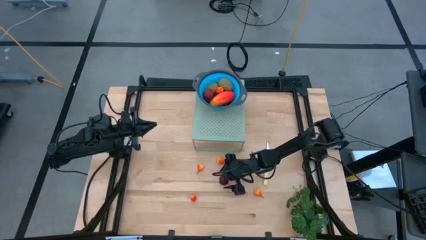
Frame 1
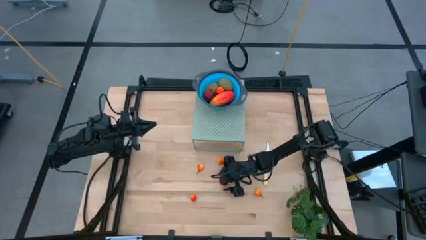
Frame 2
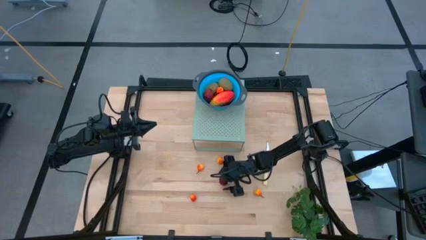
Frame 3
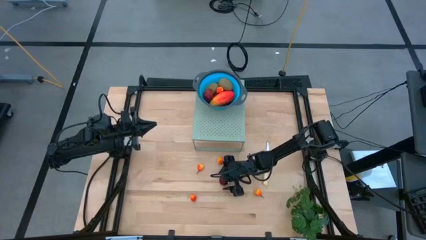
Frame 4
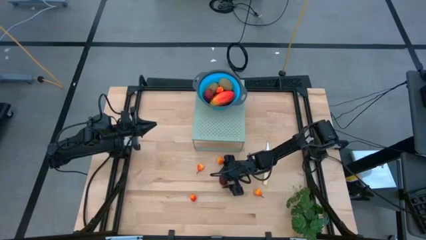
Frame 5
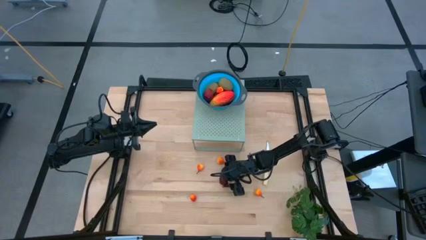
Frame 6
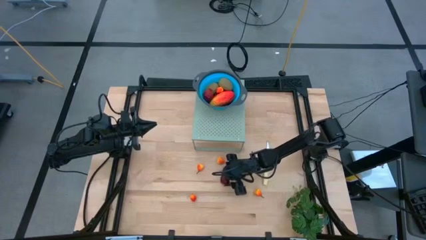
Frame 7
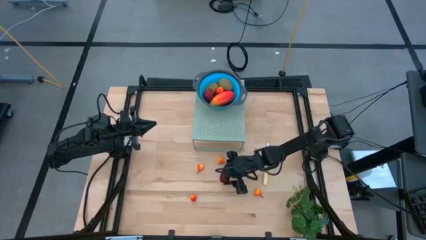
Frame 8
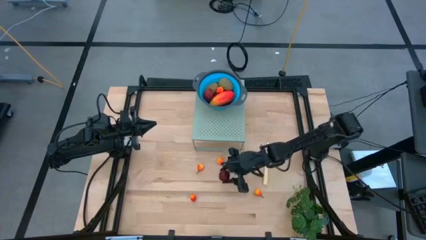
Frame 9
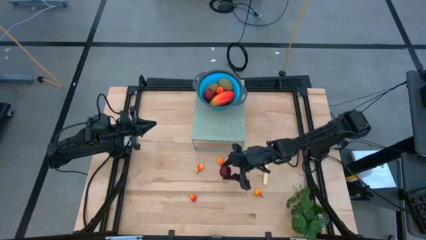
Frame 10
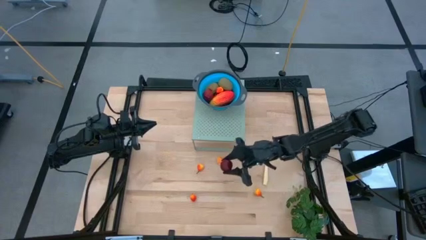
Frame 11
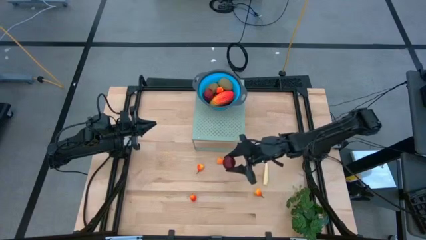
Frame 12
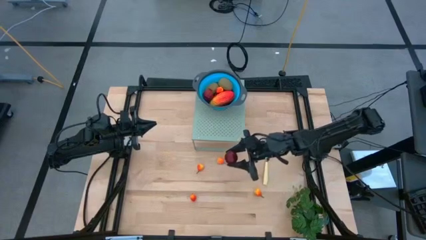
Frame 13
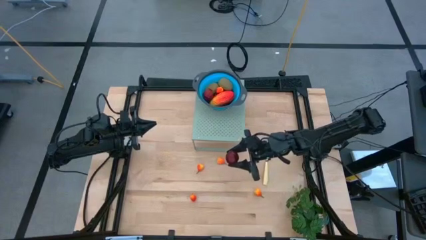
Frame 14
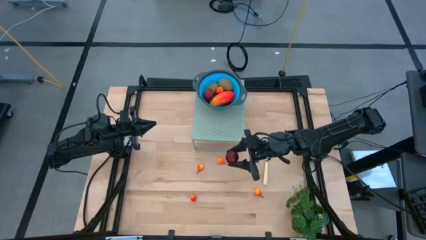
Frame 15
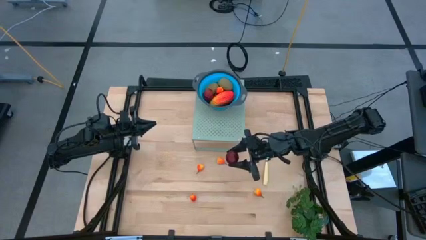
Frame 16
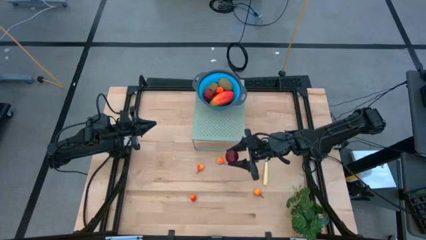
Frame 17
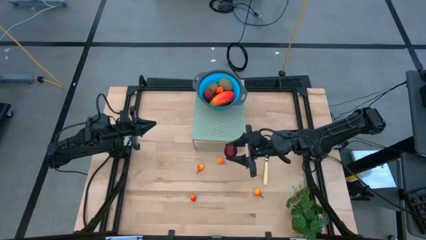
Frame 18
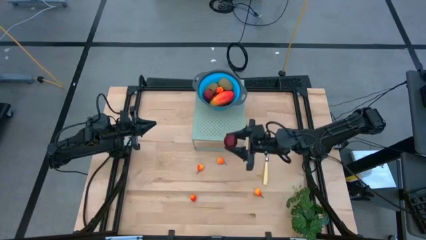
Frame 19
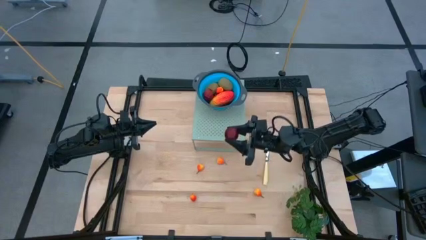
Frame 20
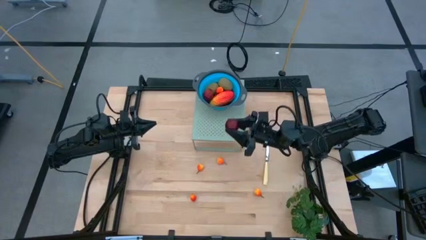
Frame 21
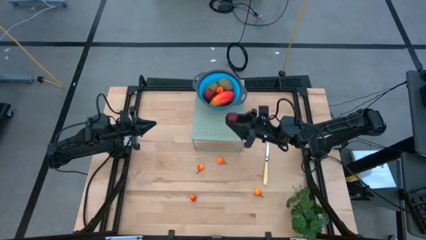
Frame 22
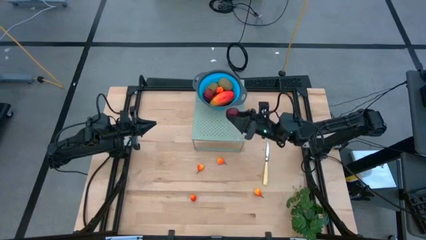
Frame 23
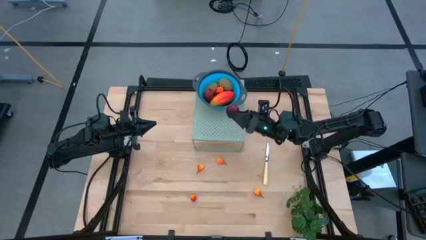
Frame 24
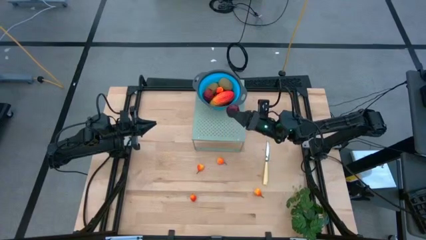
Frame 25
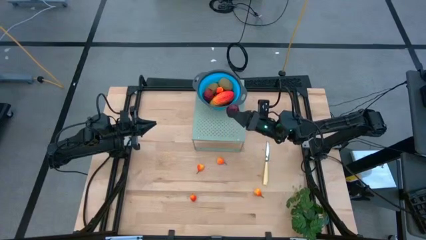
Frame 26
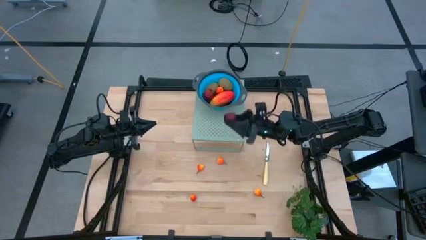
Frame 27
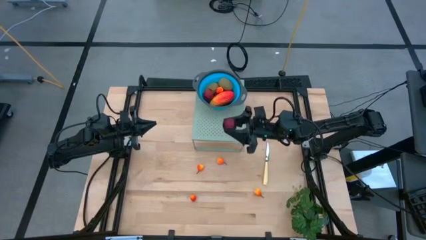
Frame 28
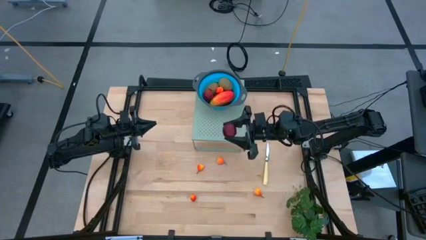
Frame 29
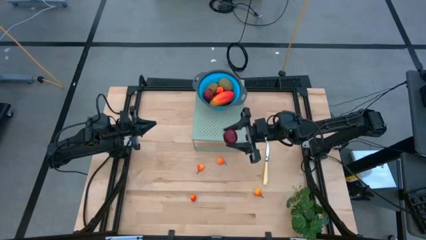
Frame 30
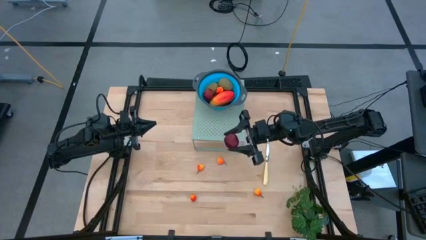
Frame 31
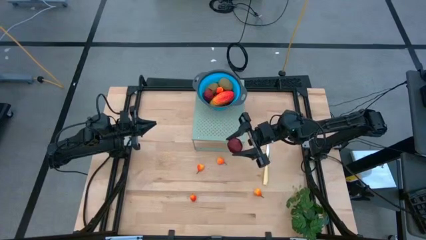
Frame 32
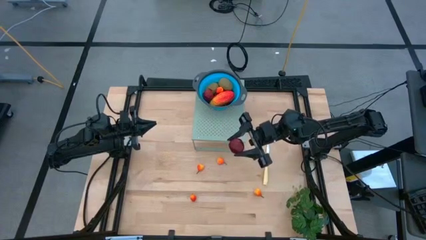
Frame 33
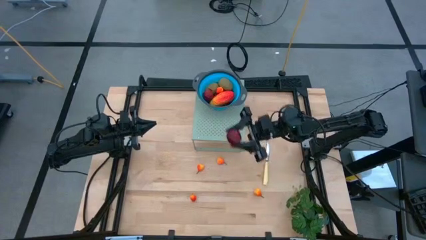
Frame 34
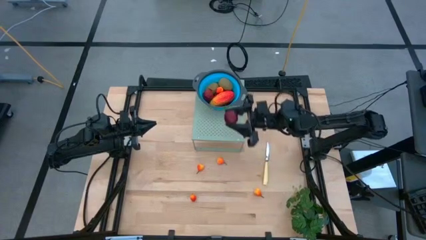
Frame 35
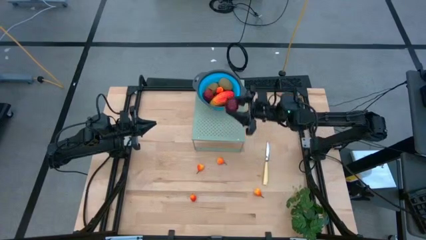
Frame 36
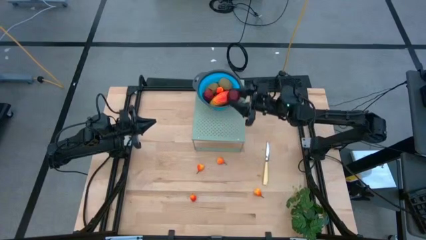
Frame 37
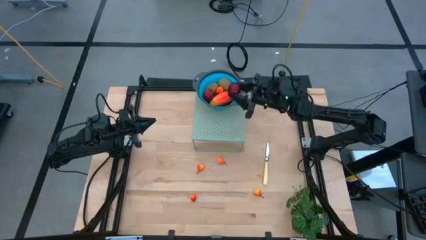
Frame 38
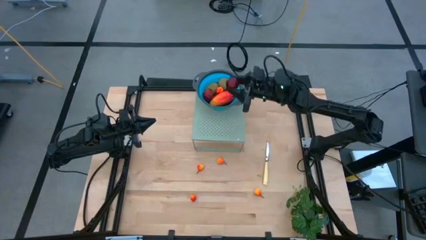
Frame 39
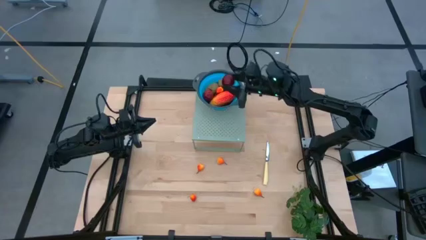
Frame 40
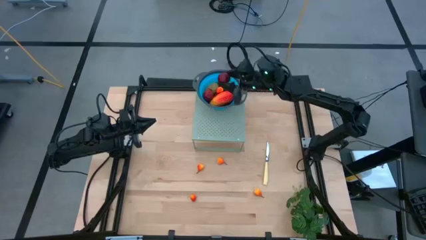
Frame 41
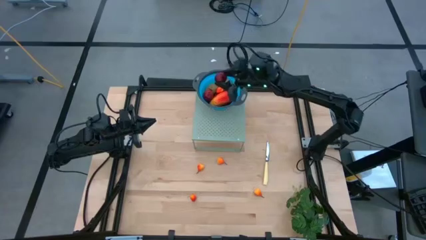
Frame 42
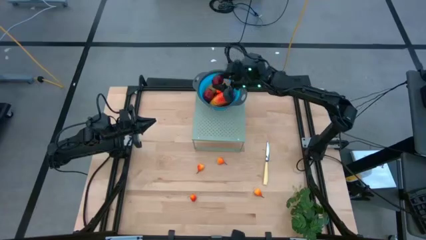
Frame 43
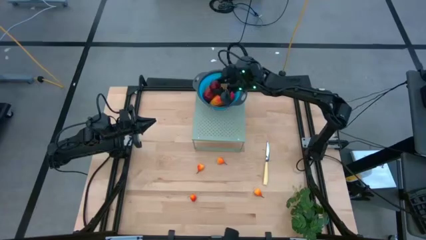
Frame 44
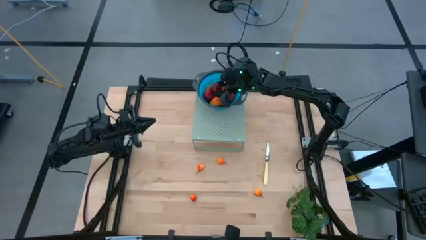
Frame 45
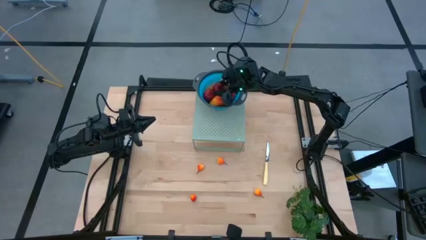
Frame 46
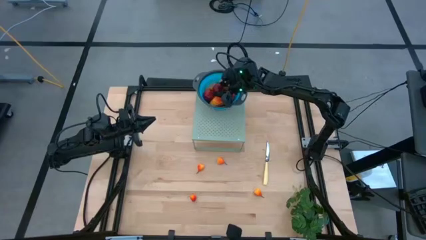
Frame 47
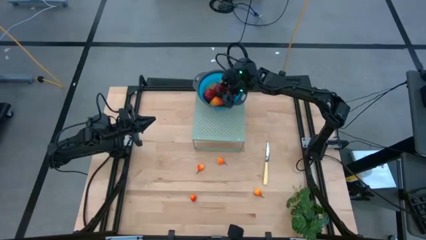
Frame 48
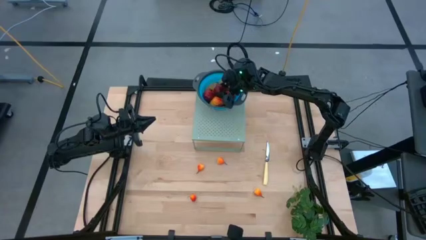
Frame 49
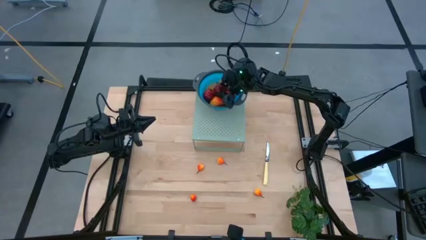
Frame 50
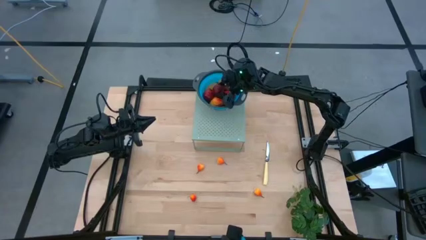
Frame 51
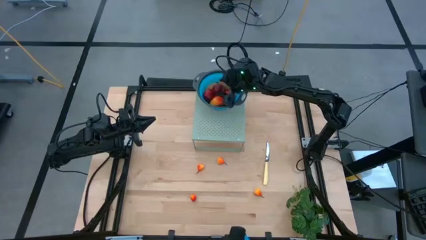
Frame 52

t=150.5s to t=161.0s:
Task: Pick & Place Fruit
Put the pomegranate into the blue strainer bowl on the shelf

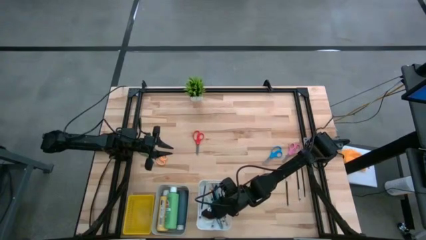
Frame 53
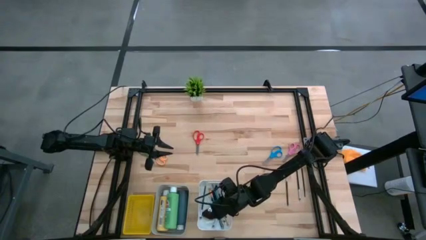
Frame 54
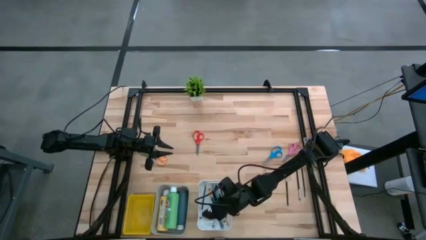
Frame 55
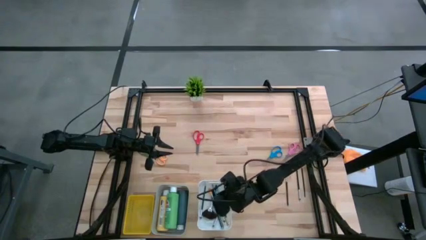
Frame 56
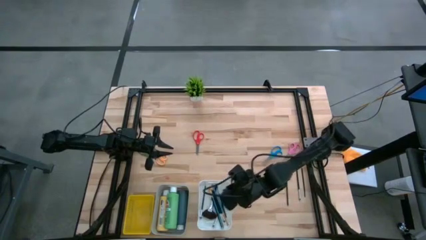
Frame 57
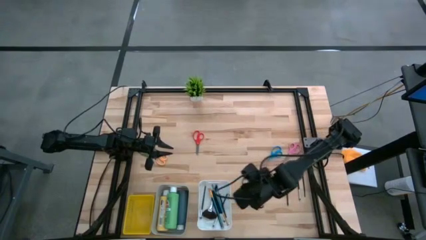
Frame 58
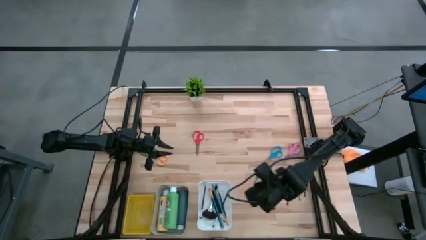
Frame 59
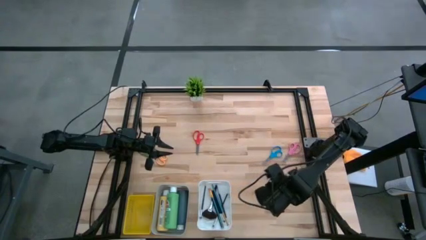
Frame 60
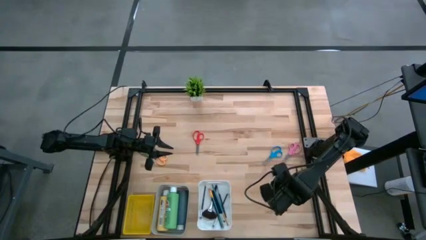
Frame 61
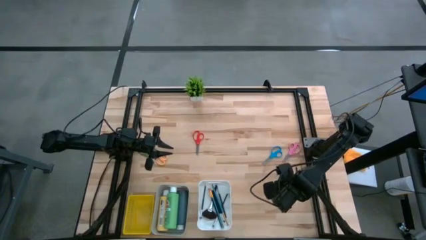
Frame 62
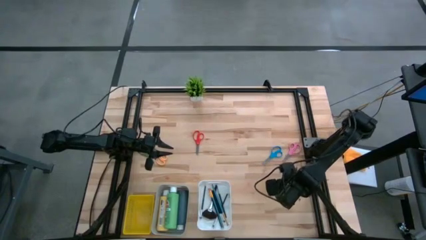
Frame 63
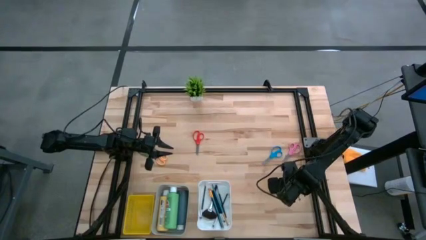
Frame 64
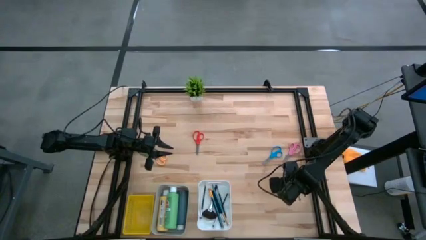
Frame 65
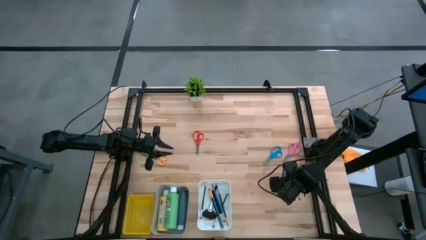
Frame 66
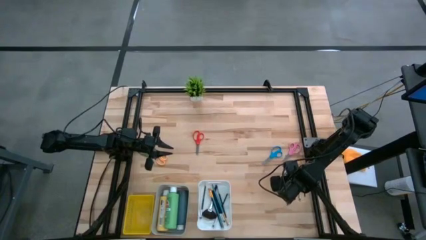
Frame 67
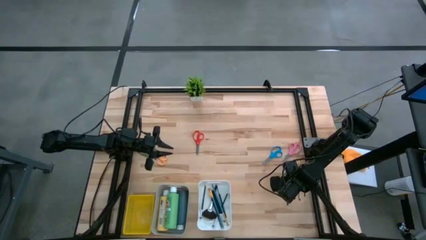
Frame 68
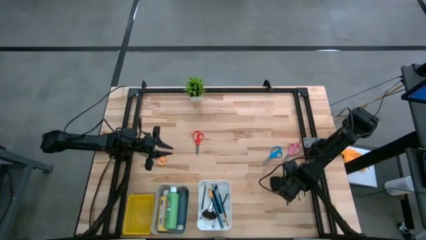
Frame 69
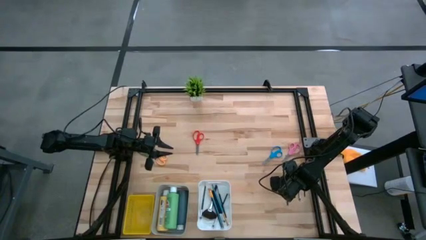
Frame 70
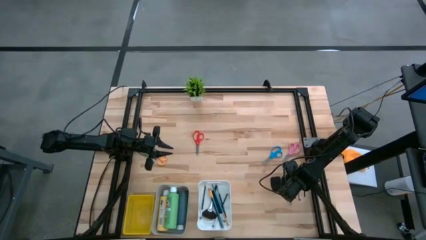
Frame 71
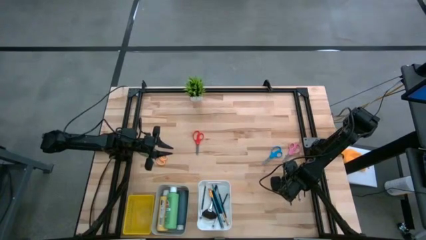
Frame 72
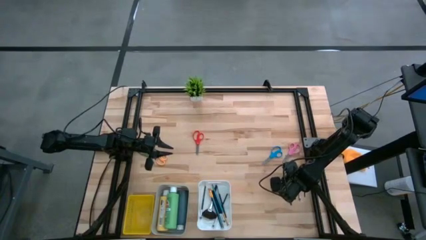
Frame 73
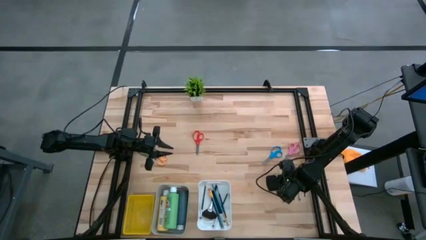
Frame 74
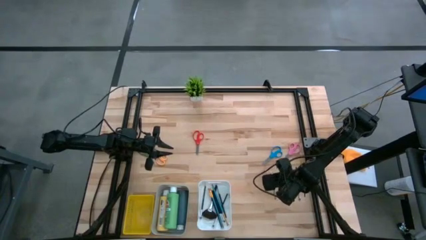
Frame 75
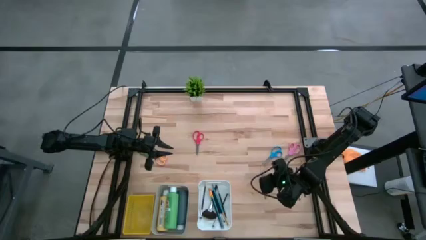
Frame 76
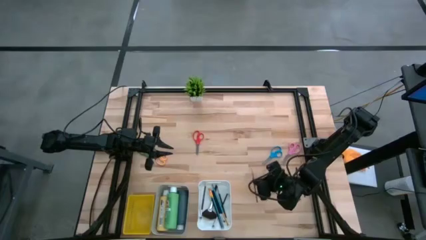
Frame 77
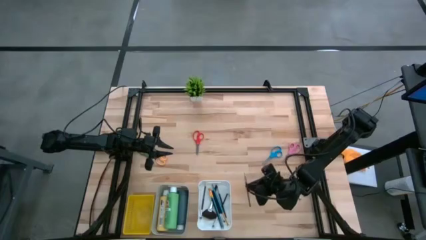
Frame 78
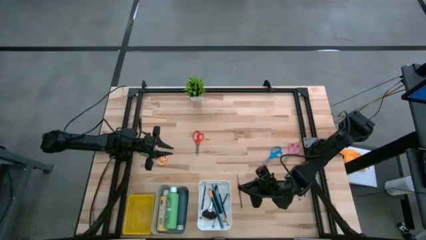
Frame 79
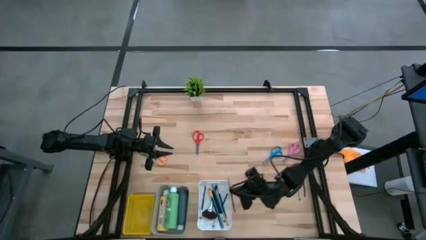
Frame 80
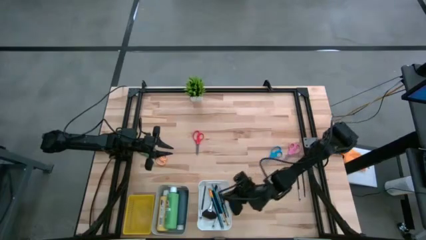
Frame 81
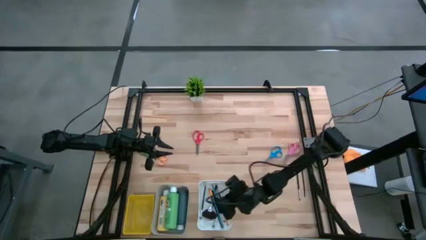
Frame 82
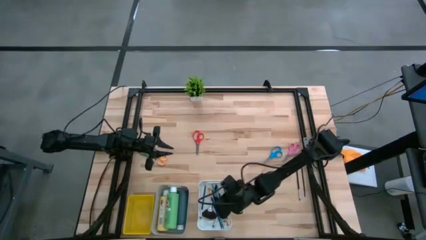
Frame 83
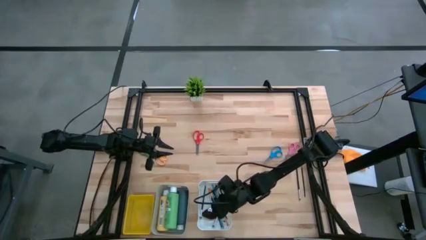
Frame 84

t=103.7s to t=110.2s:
Task: Pick & Place Paint Supplies
Put the black paint brush into the white bin
